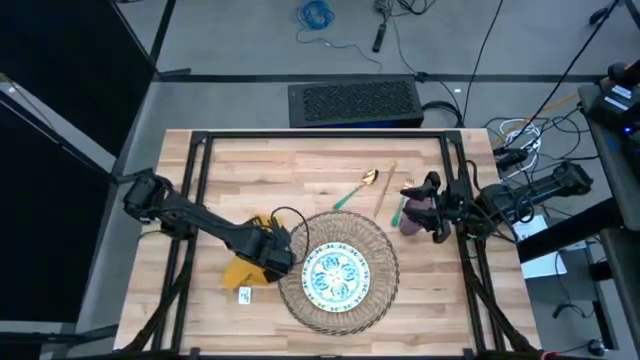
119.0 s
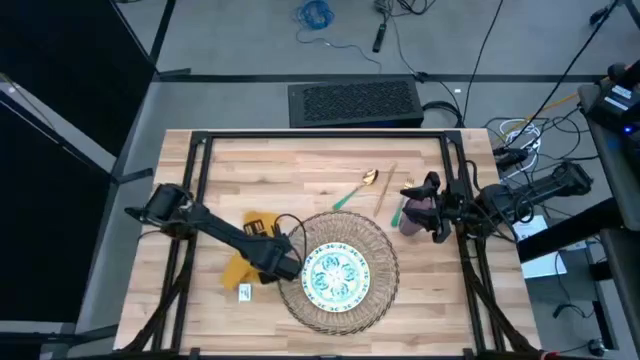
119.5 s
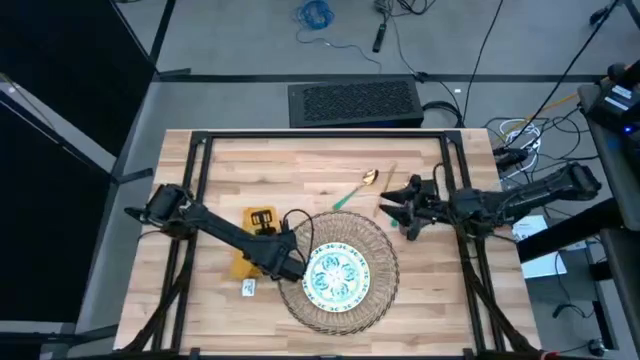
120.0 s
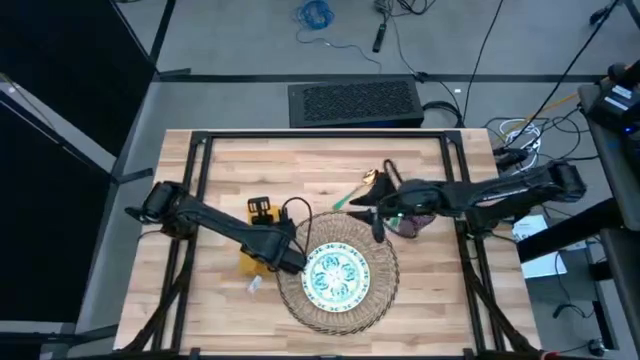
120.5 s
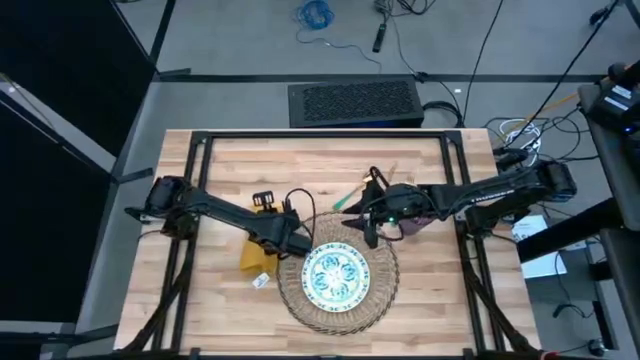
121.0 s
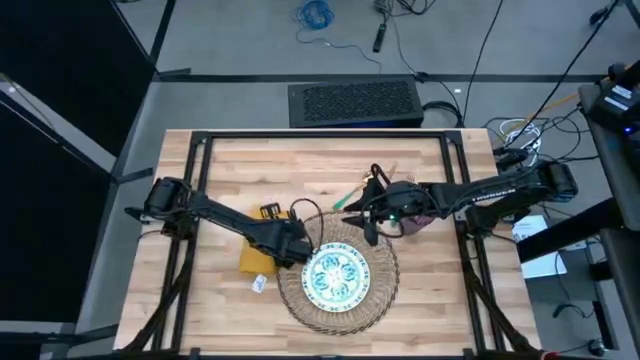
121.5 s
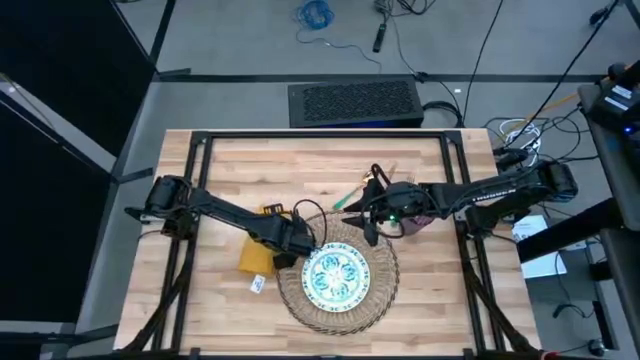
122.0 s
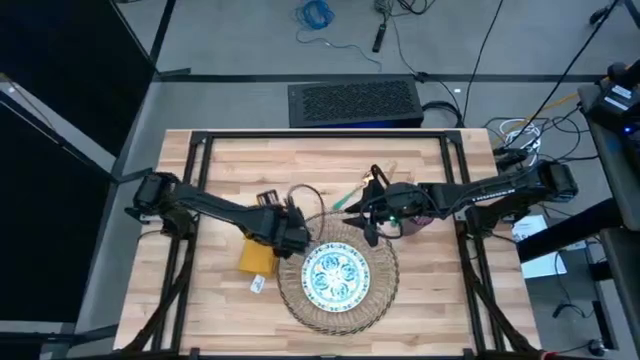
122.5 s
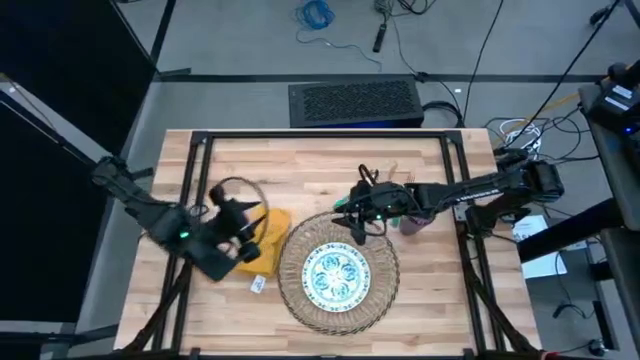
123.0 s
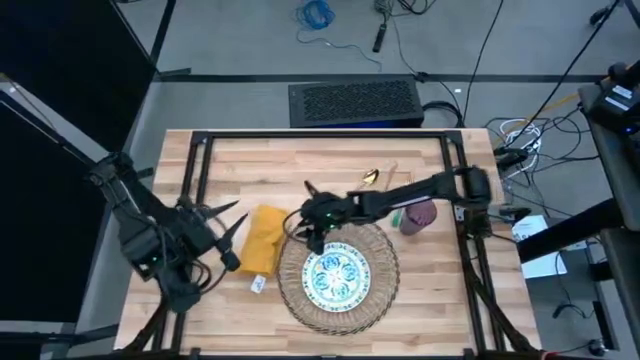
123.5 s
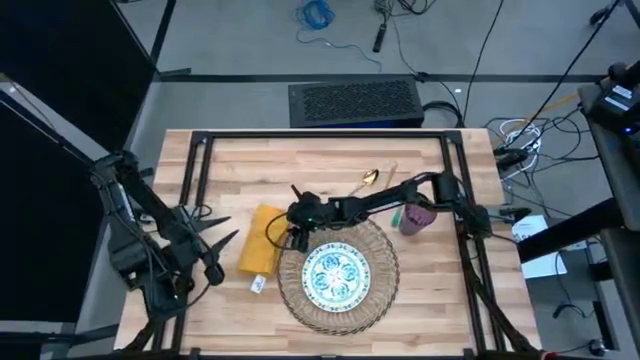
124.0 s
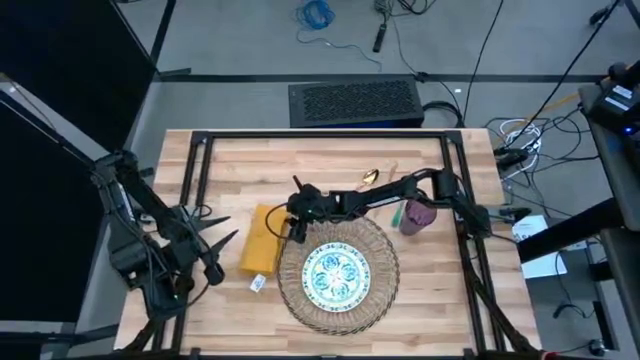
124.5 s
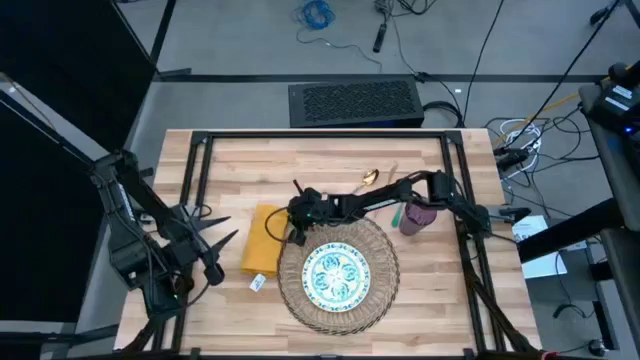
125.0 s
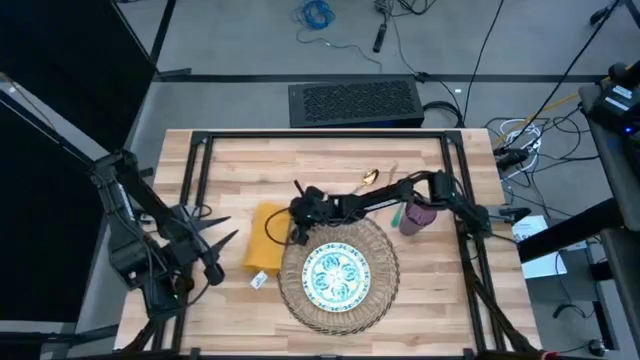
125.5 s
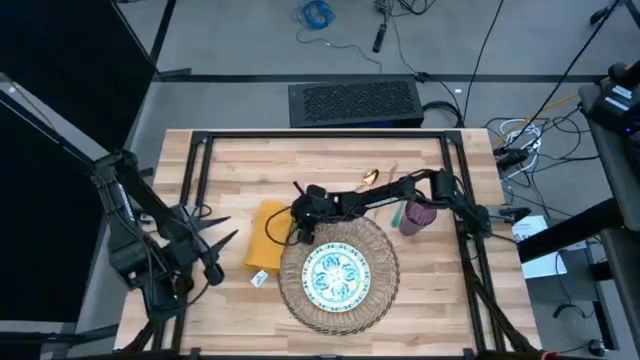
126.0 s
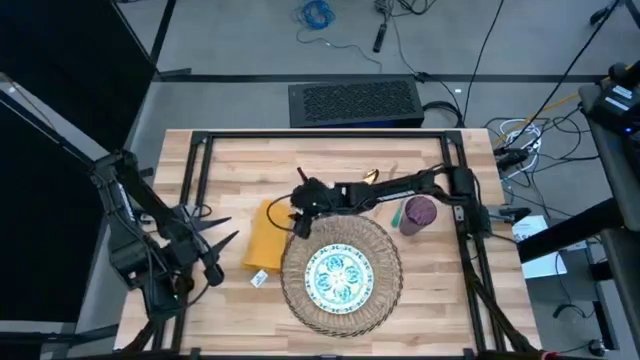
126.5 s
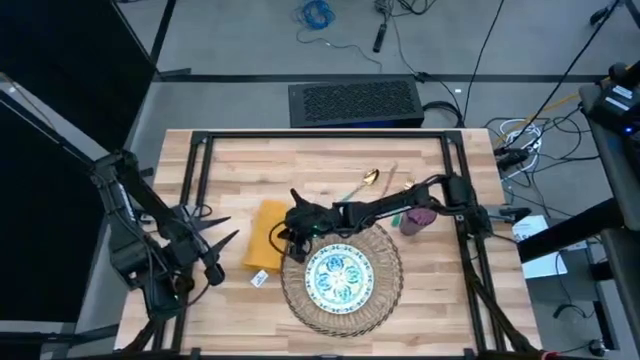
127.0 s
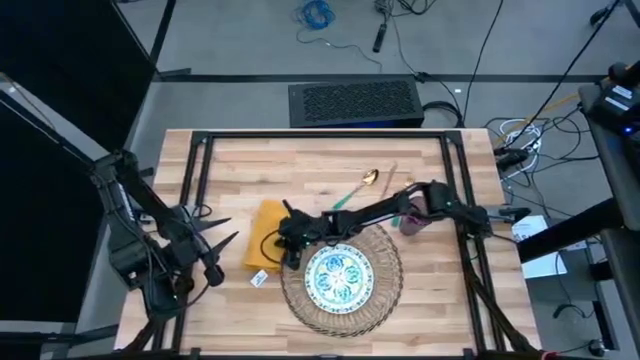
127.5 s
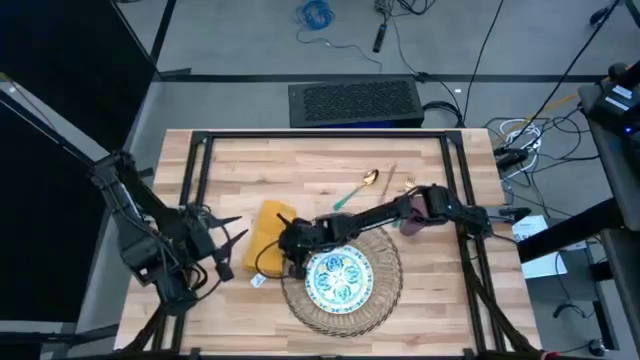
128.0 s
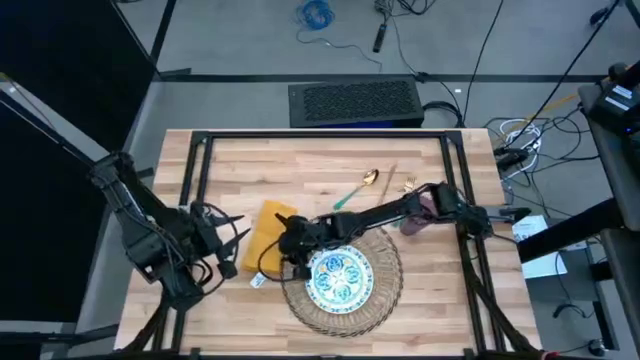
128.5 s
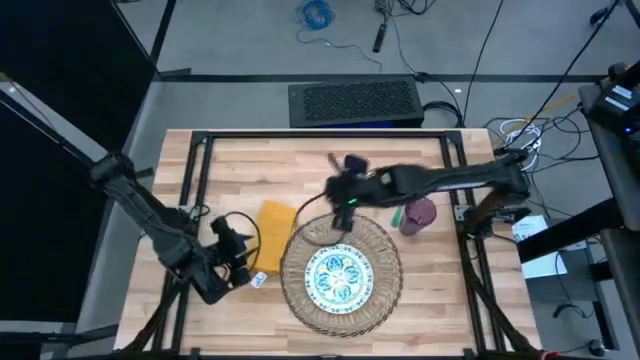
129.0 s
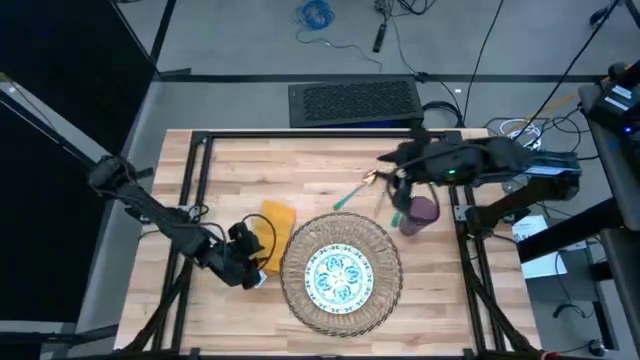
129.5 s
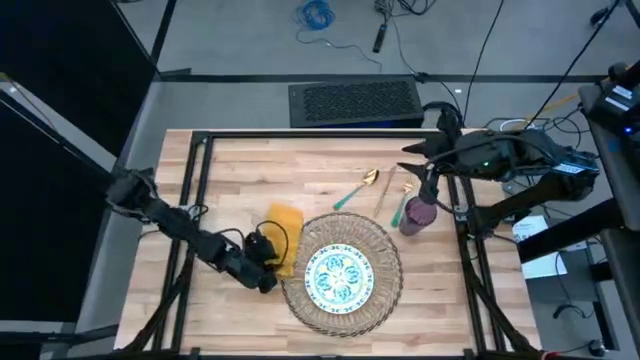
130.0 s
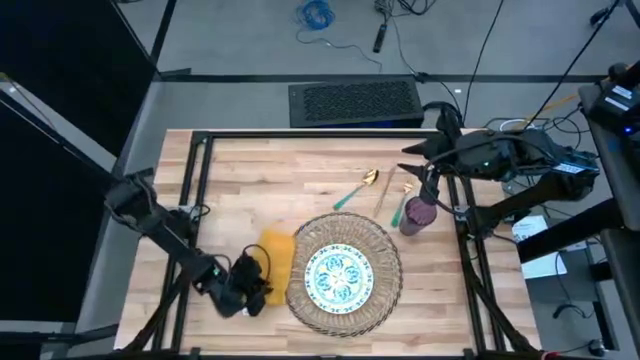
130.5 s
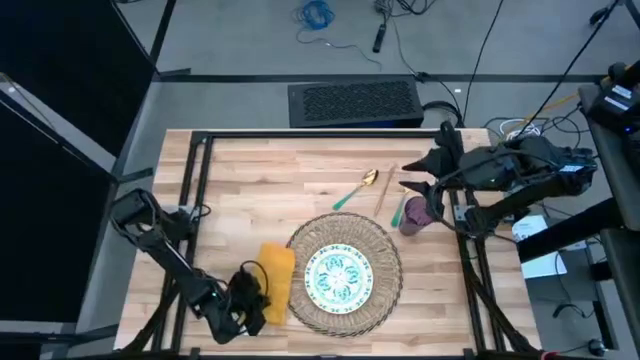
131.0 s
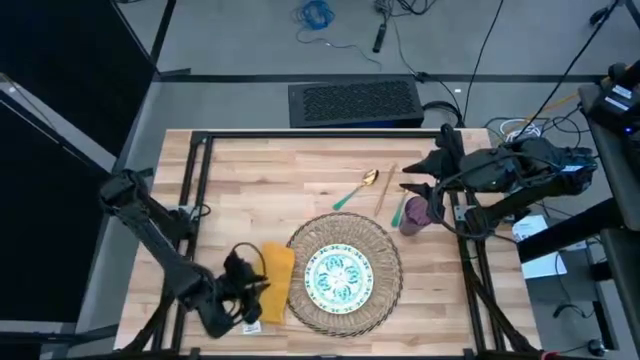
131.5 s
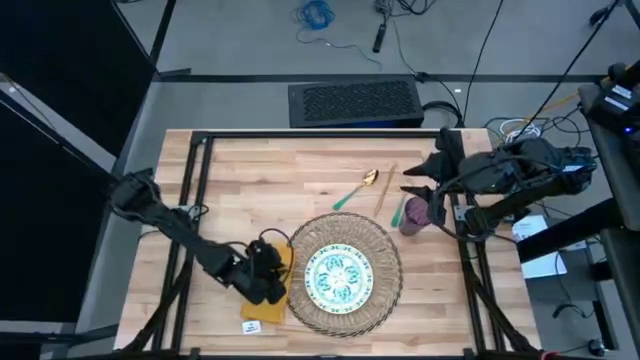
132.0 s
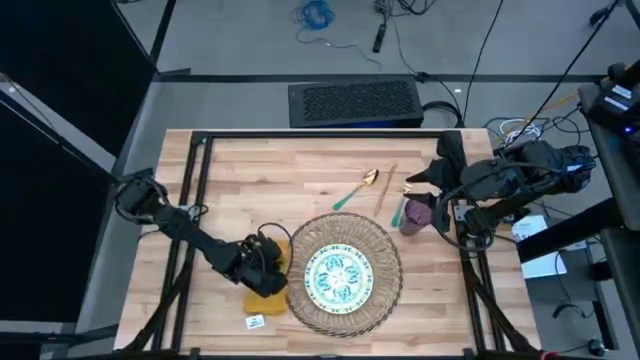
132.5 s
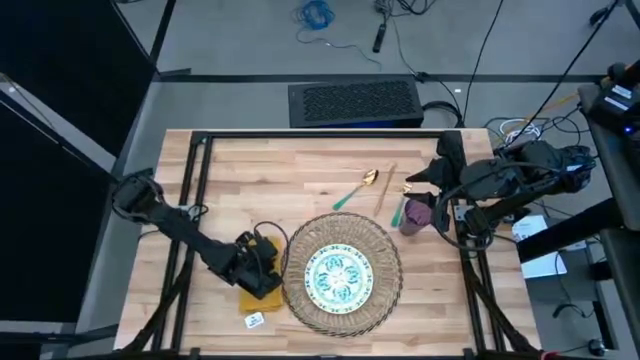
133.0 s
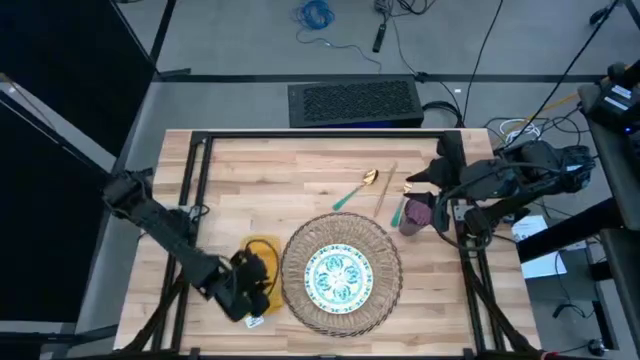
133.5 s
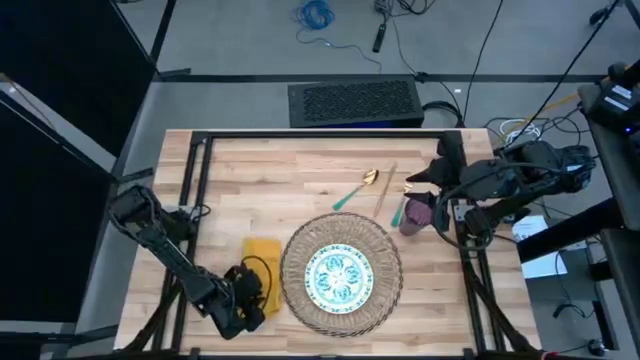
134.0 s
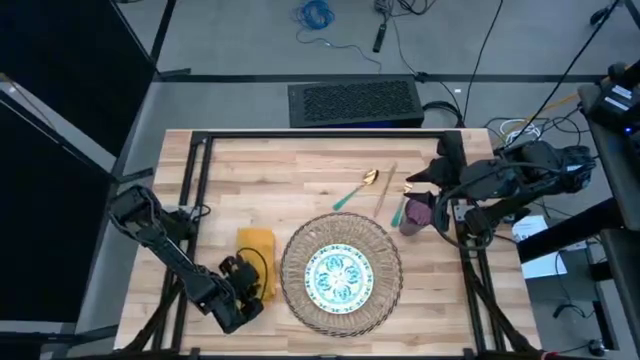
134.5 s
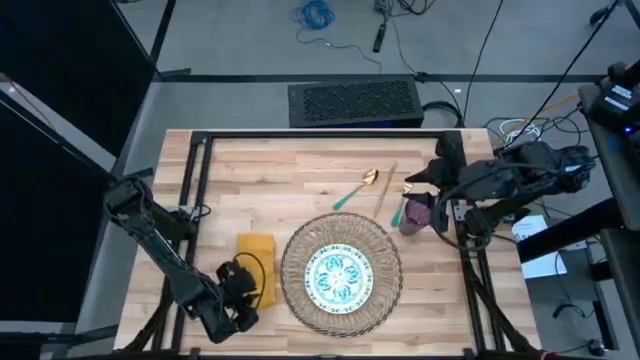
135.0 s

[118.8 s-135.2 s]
Task: Set table place
Adjust the folded yellow table napkin

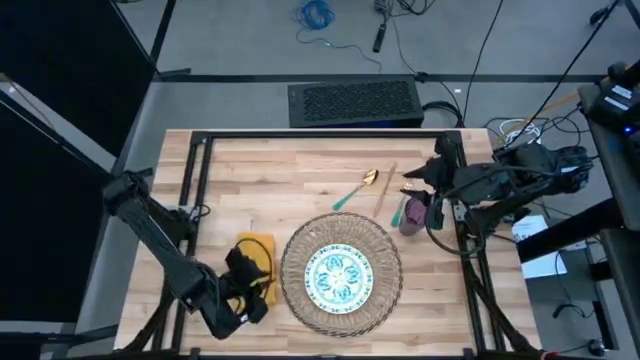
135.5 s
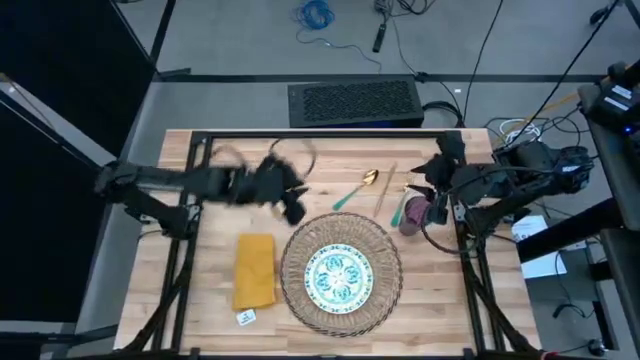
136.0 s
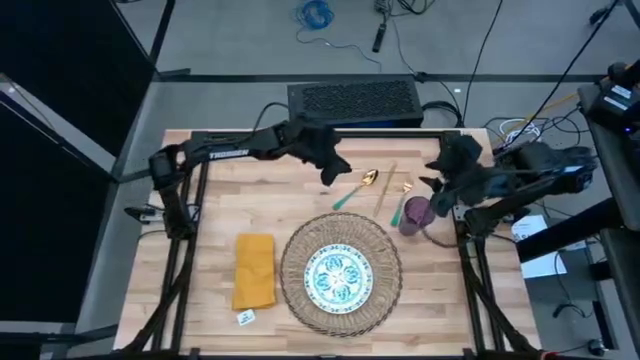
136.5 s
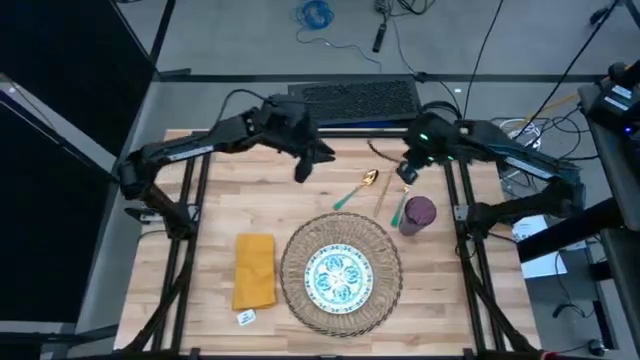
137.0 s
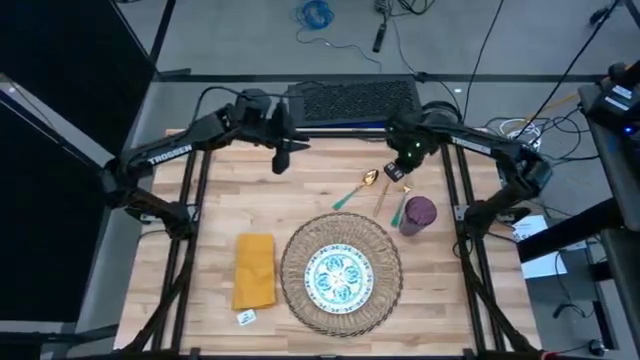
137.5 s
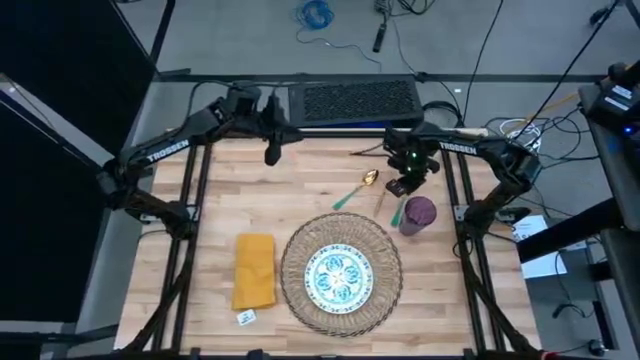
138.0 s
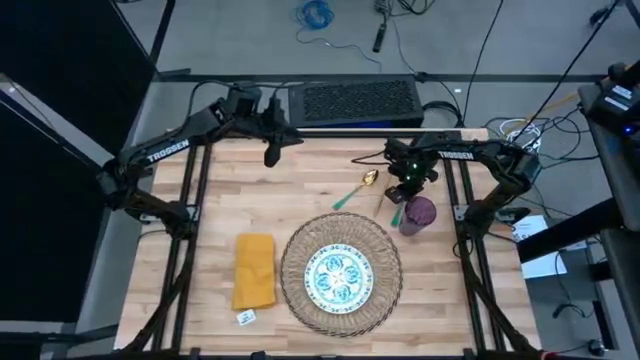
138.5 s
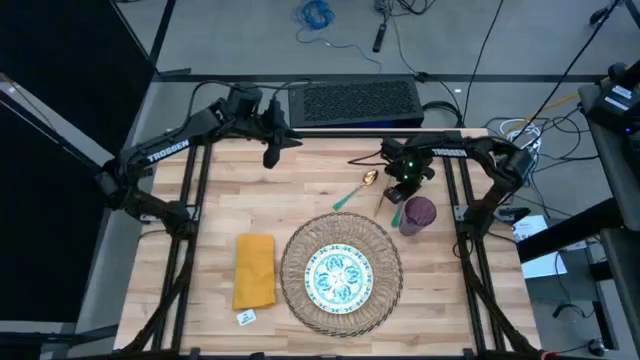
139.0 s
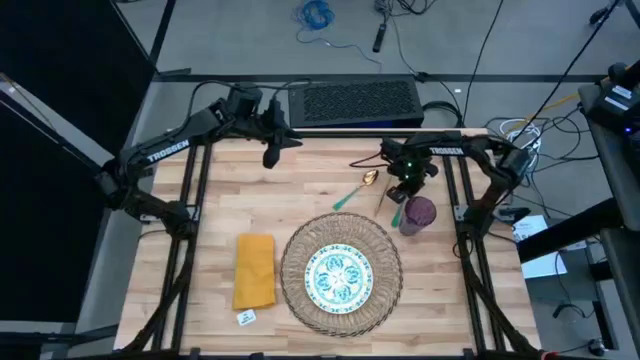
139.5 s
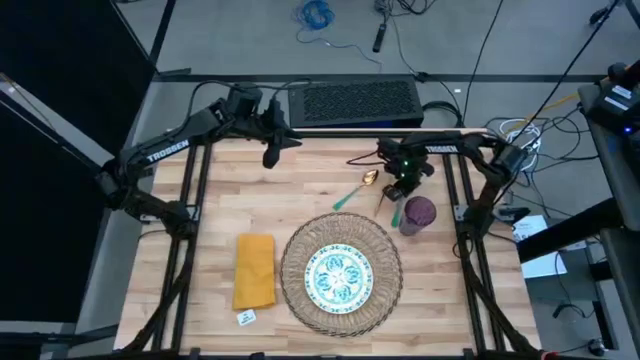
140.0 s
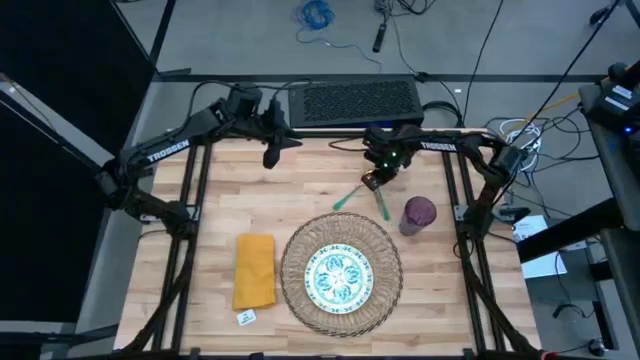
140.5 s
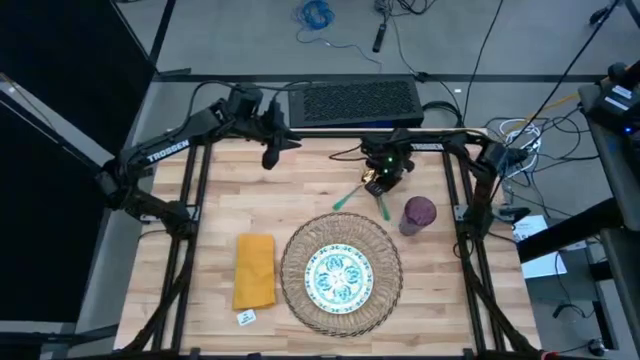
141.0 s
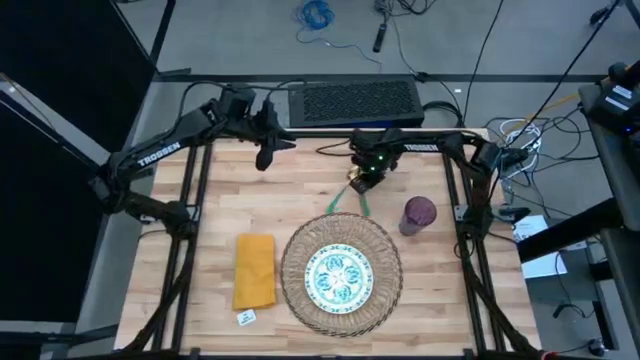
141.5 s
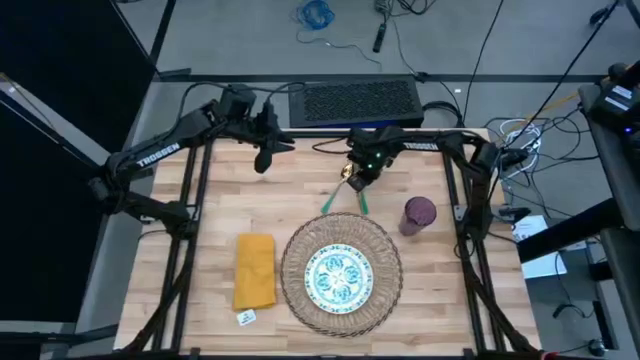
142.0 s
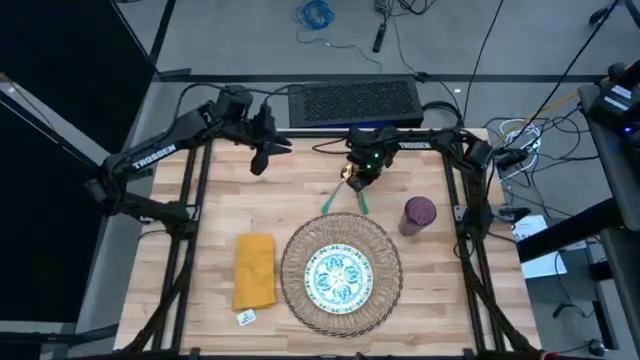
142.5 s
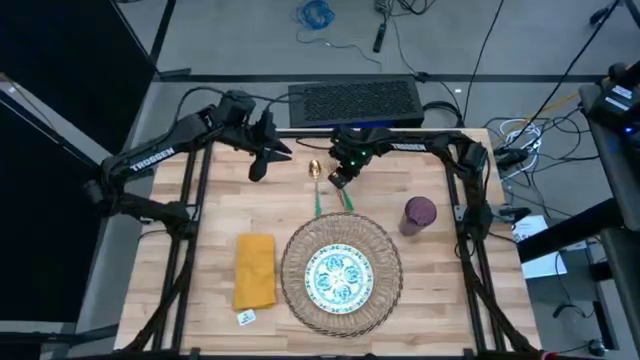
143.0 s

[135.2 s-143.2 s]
Move the silverwares to the top middle of the brown table mat
